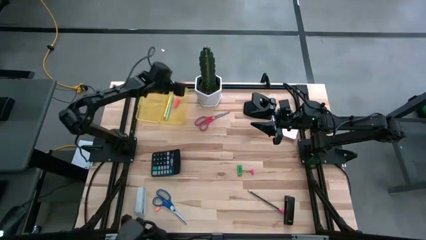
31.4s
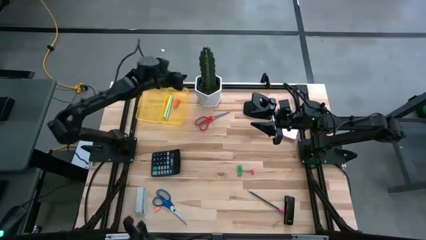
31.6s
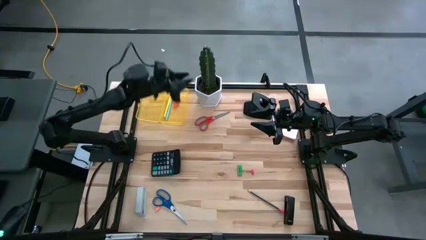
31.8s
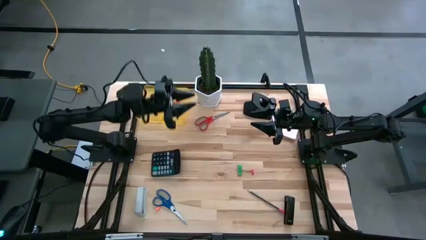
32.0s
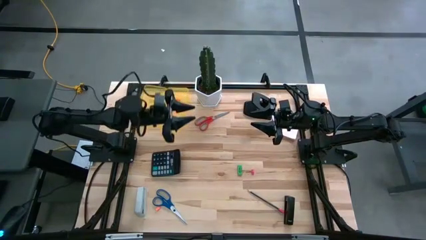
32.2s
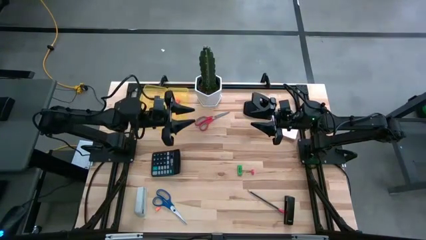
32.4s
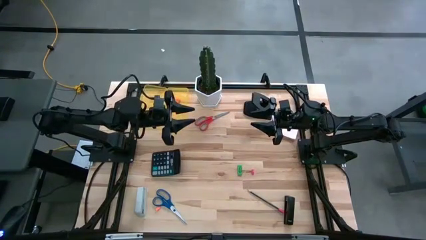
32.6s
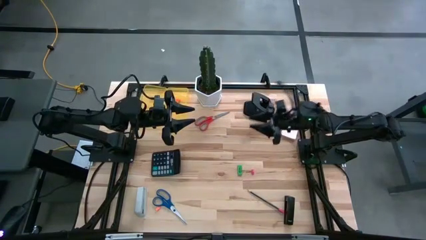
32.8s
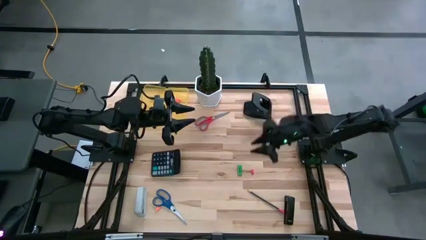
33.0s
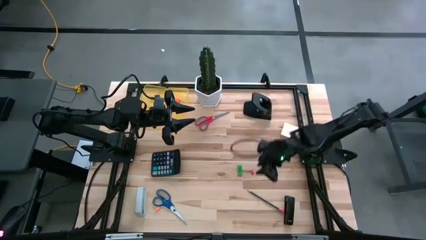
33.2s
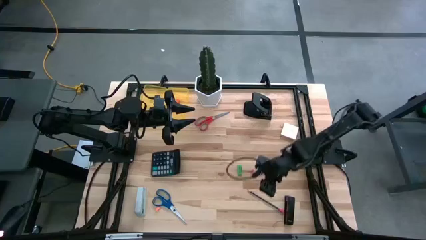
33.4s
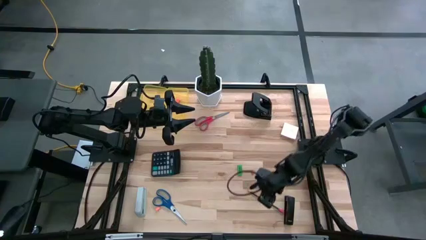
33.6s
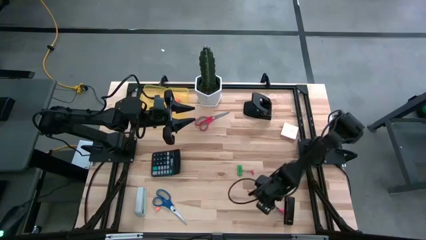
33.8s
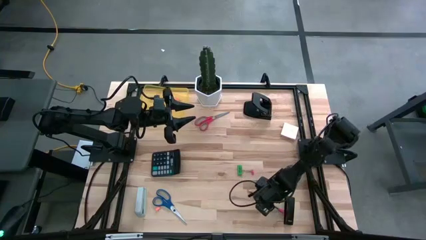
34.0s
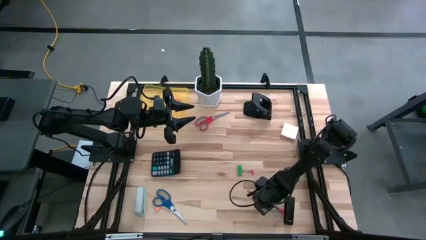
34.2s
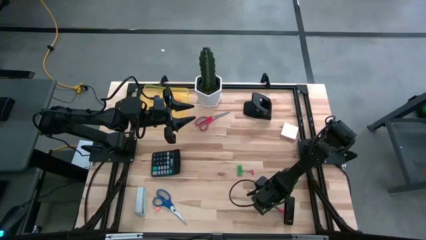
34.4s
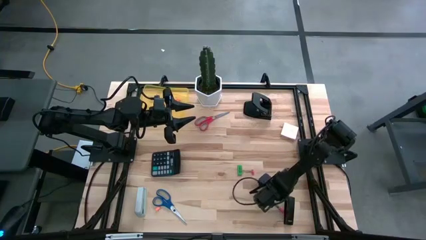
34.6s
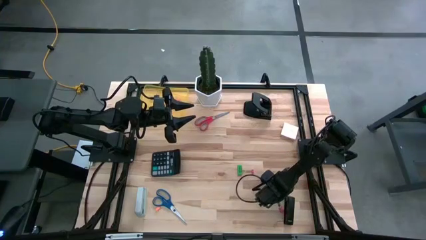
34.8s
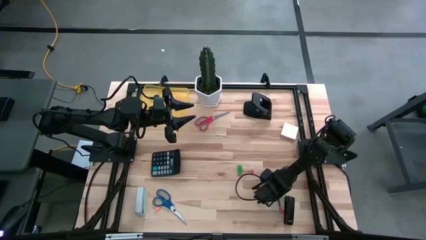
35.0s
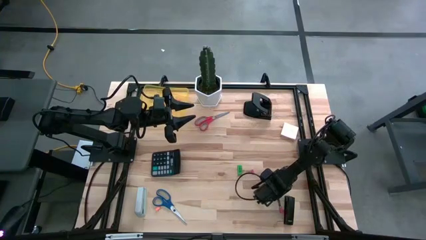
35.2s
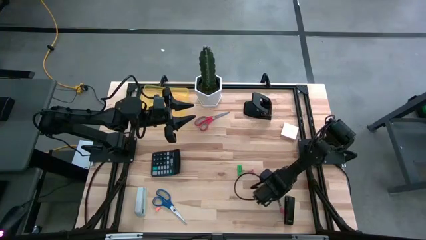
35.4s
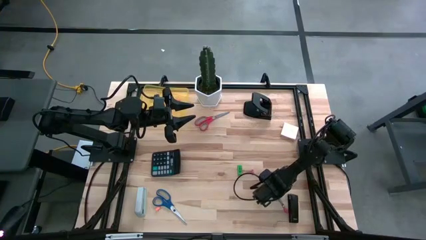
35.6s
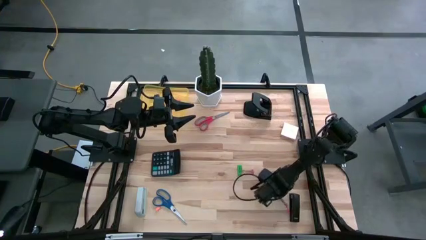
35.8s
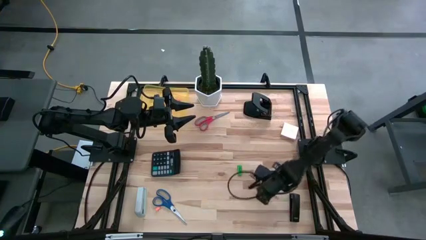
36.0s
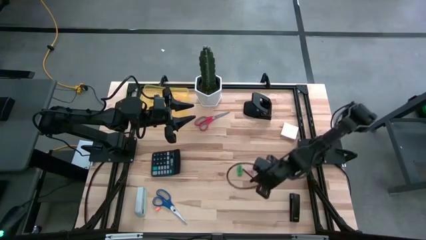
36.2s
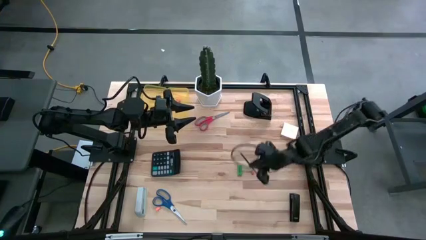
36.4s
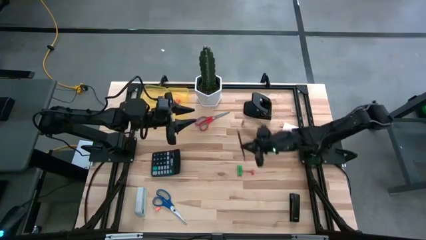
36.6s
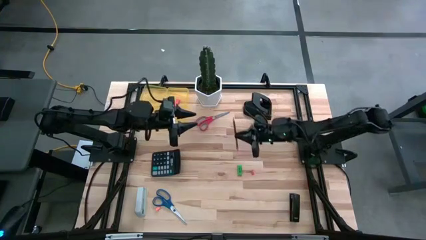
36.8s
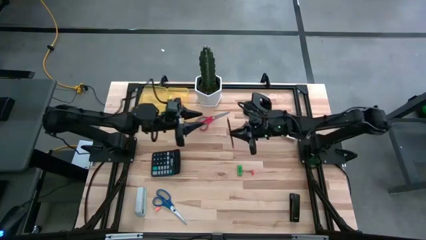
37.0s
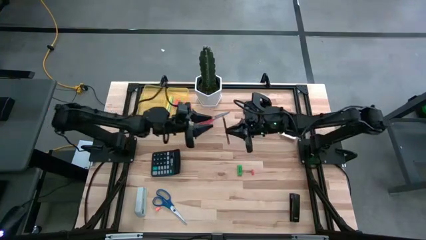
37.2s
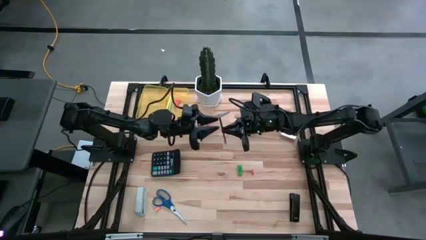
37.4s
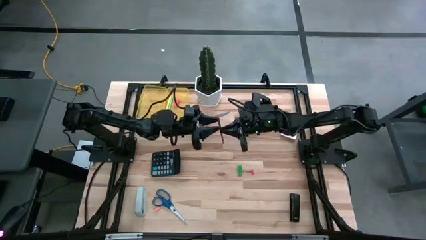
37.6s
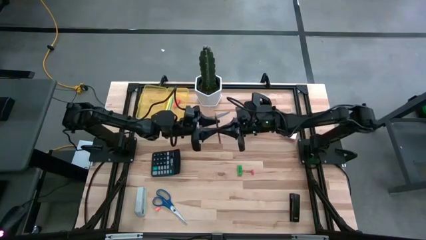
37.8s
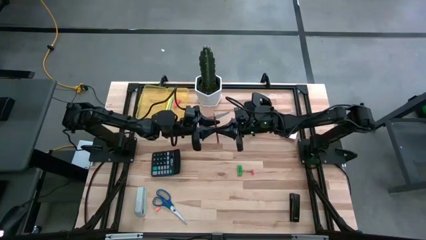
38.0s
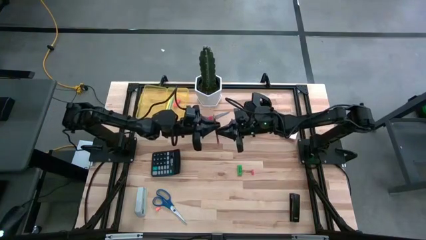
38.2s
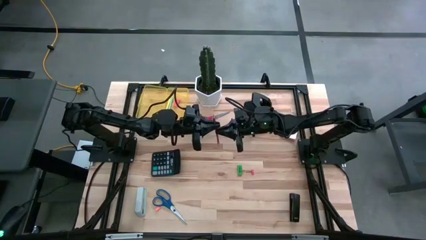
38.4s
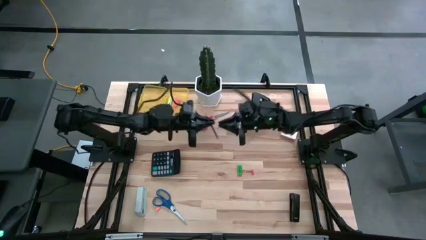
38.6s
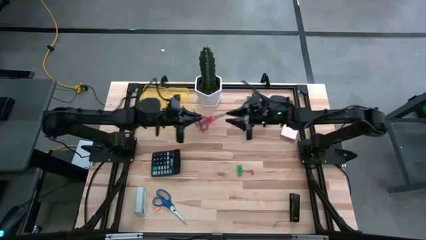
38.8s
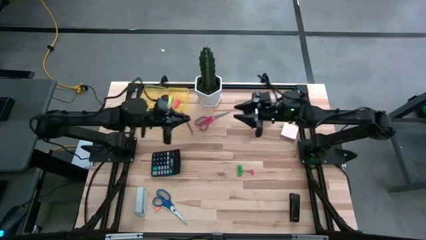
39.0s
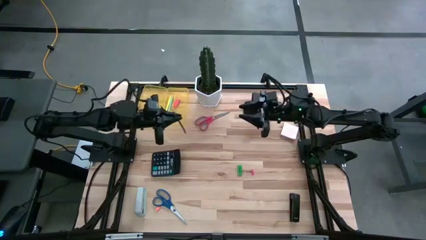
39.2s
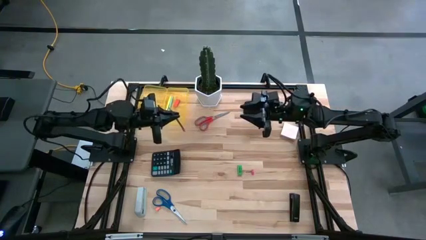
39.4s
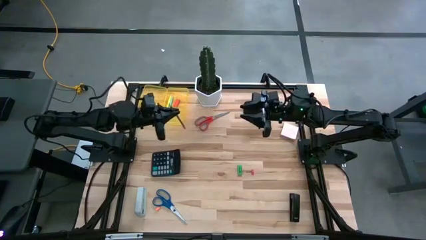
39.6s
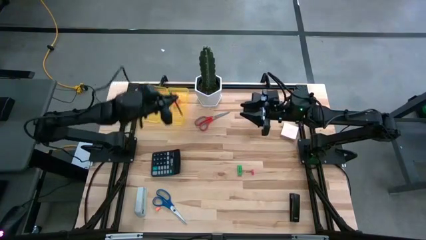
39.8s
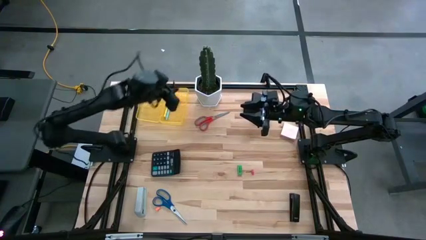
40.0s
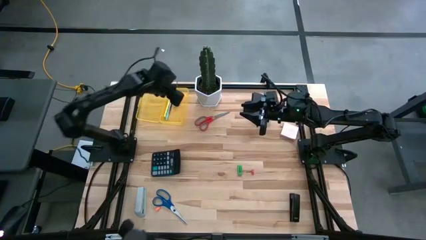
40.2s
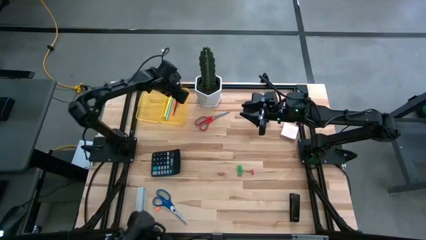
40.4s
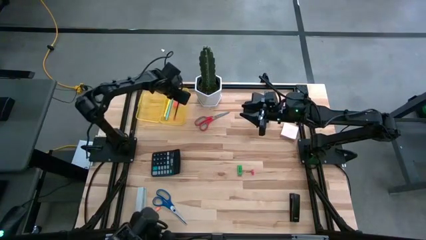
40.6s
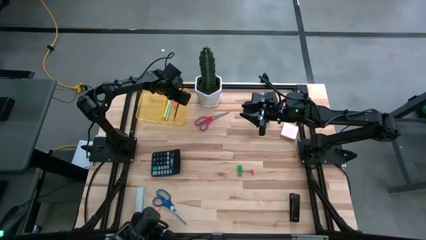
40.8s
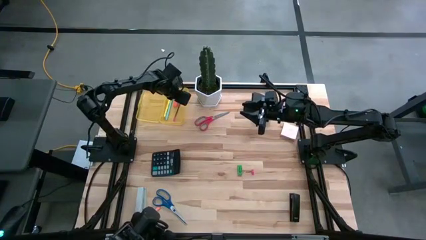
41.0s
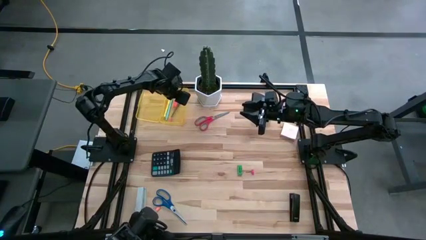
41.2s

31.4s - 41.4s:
Task: Pack school essentials
Put the black pencil into the transparent yellow supply box
